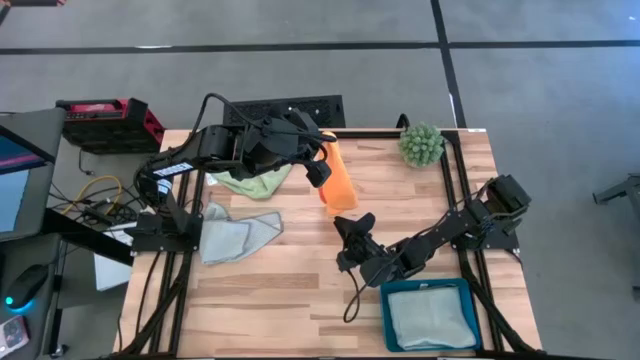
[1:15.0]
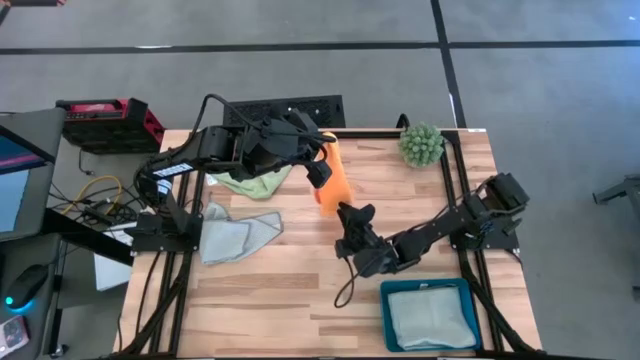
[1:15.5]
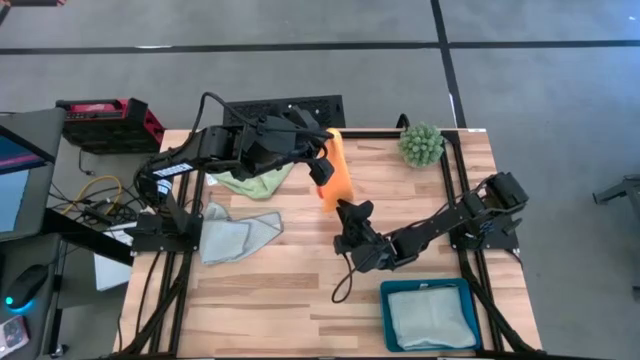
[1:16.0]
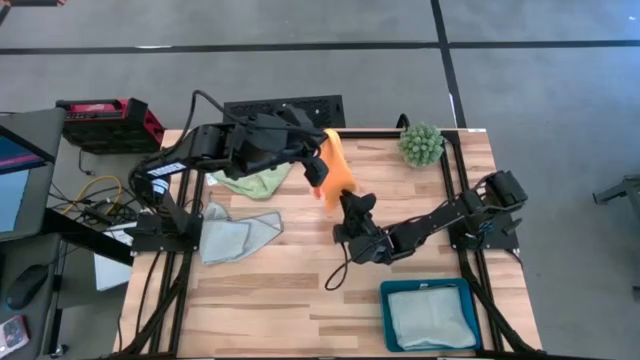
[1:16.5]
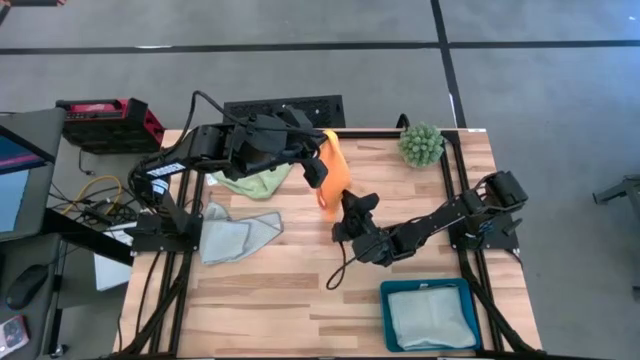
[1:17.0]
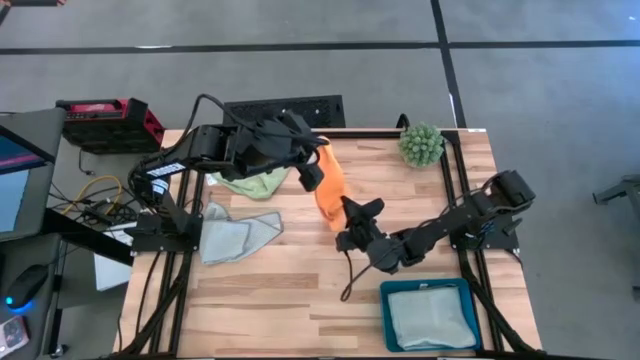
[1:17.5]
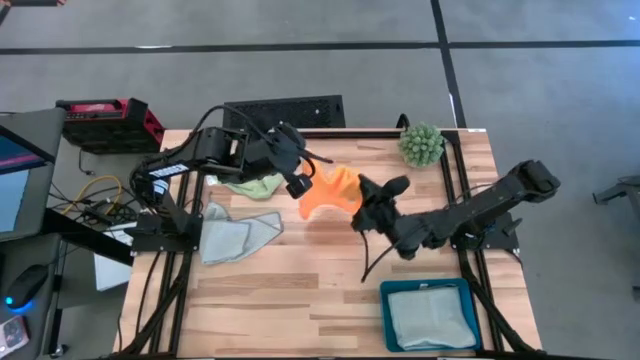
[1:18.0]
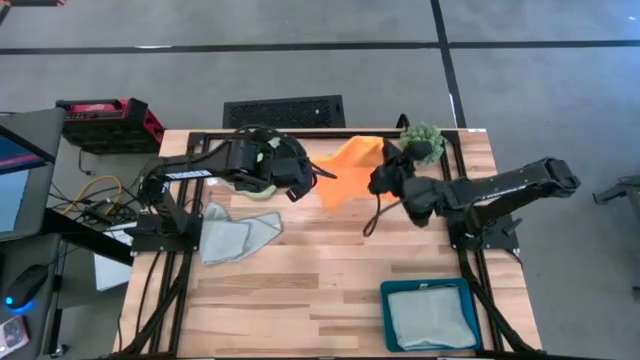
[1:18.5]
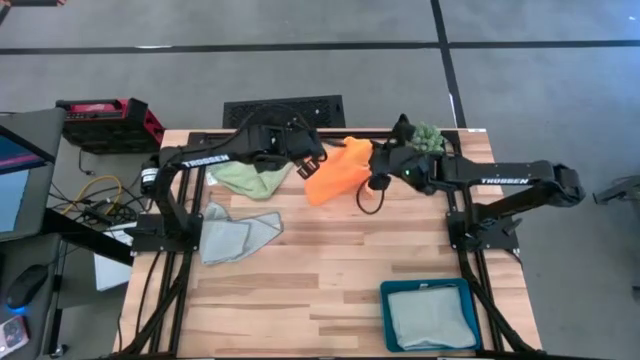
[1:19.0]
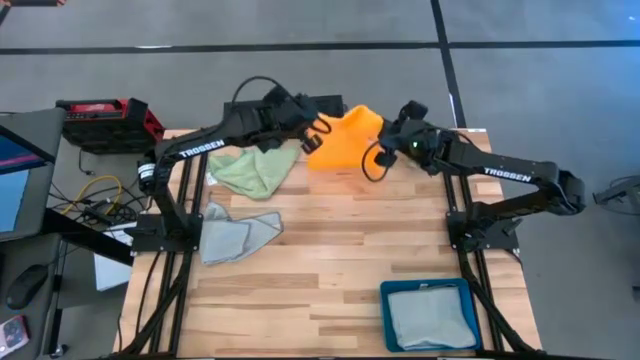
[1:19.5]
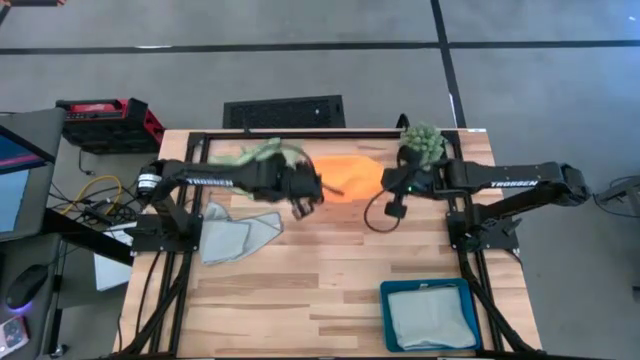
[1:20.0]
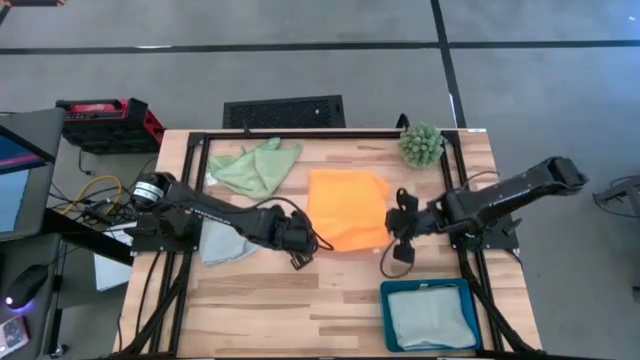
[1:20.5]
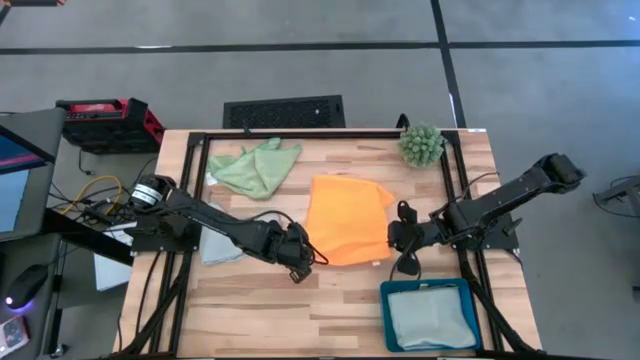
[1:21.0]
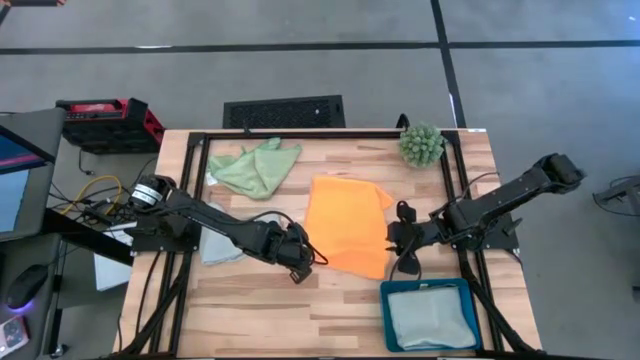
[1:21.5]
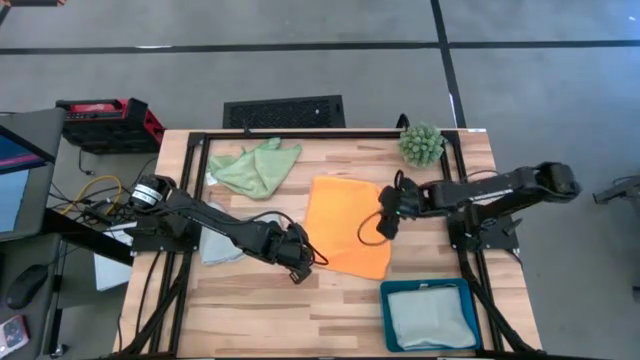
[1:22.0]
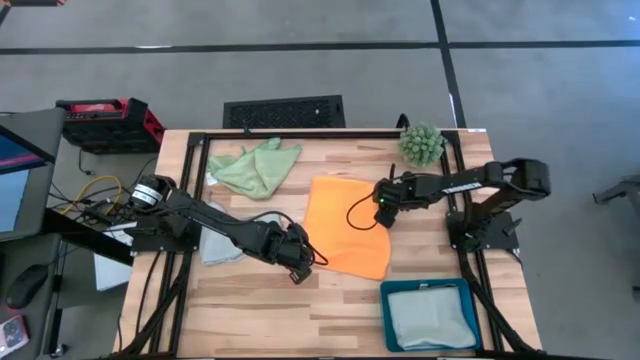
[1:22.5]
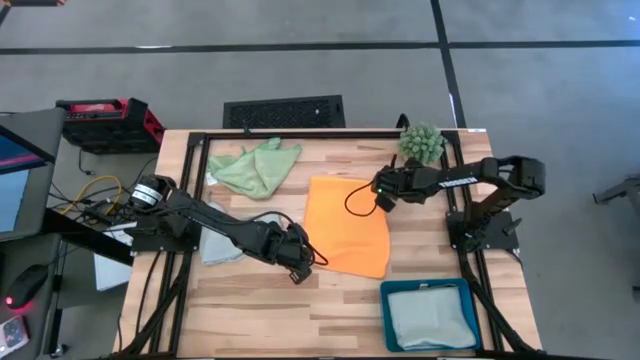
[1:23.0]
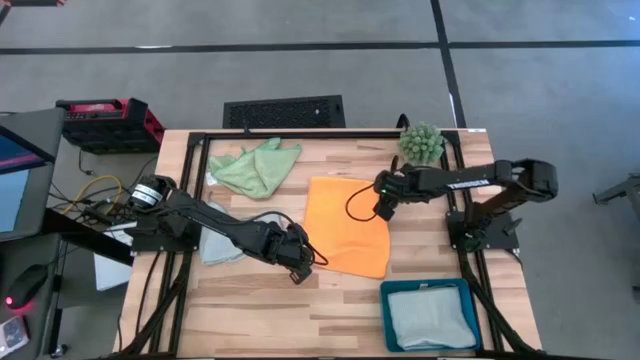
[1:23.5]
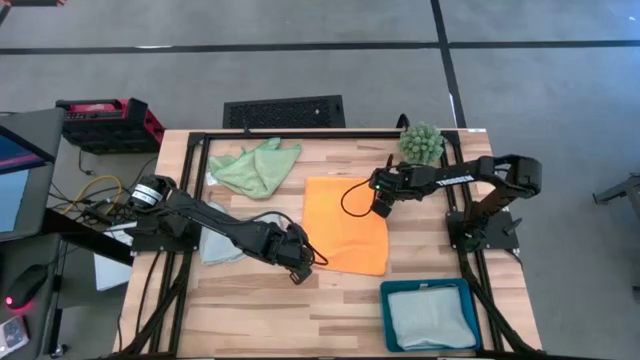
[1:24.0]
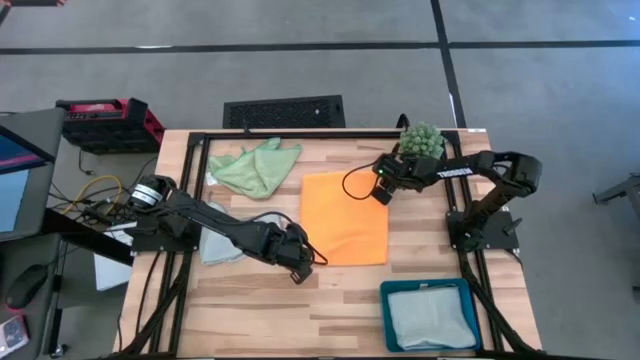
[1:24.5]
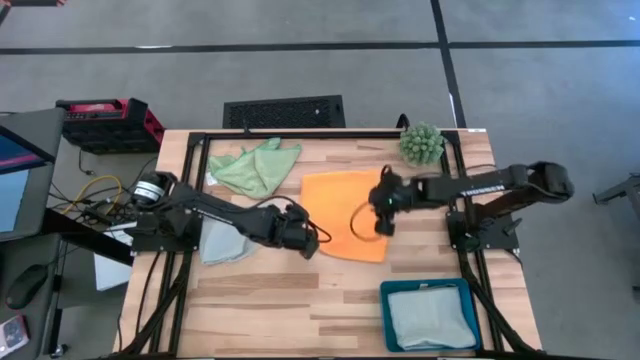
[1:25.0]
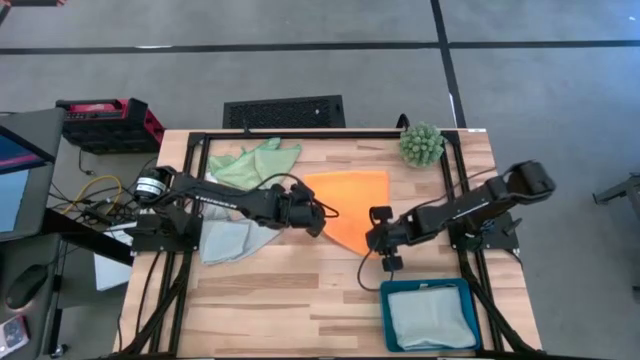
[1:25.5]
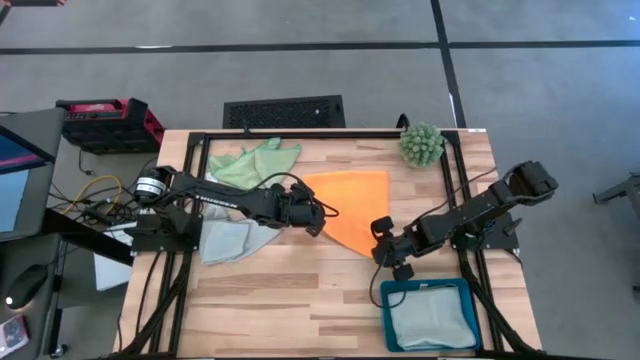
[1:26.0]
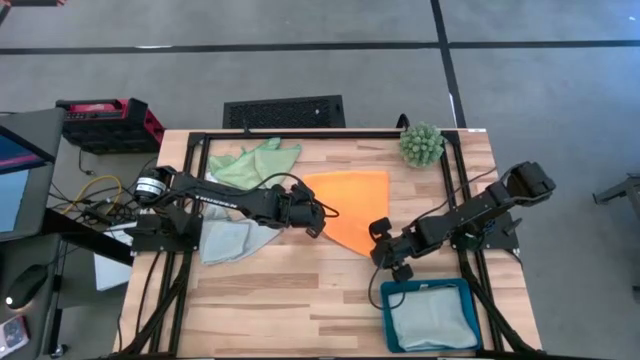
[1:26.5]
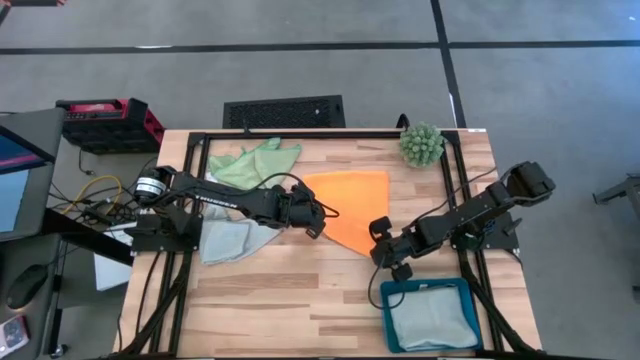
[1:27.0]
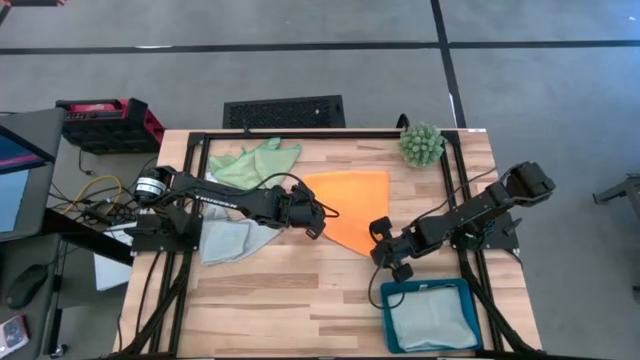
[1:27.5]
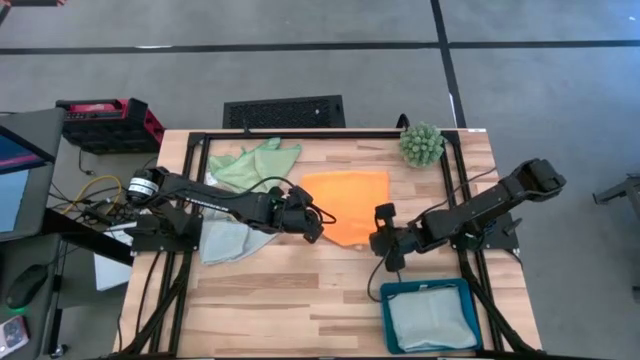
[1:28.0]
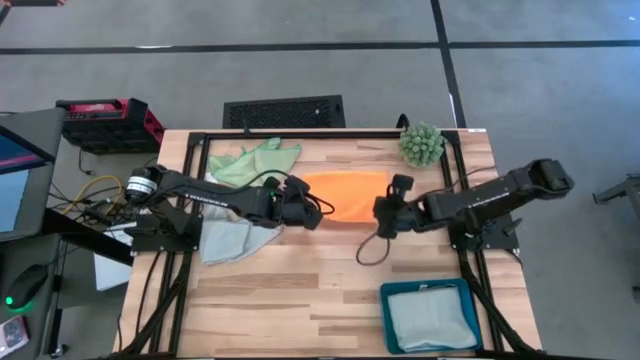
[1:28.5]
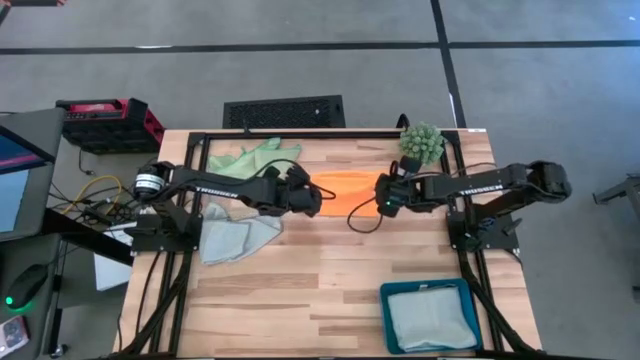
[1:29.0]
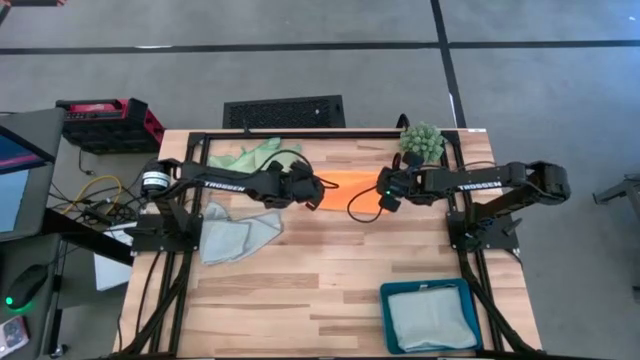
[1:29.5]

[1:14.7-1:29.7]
Task: Fold microfiber towels
Fold the orange towel

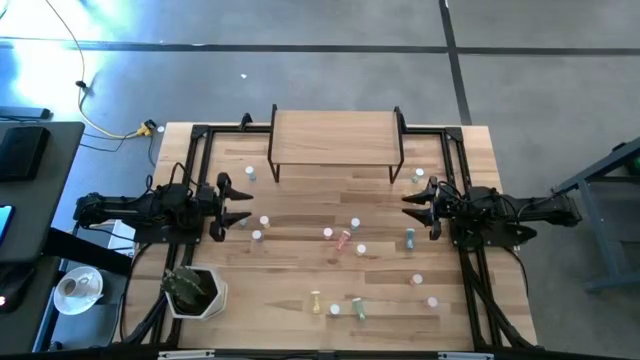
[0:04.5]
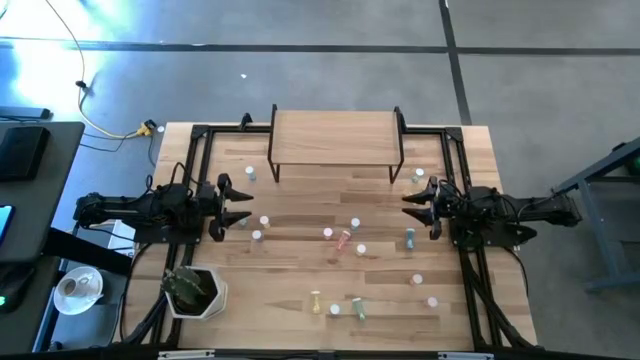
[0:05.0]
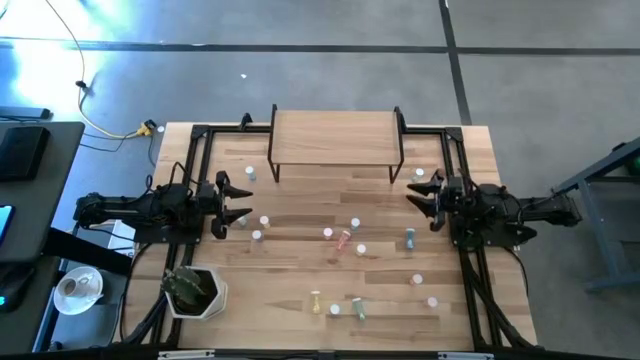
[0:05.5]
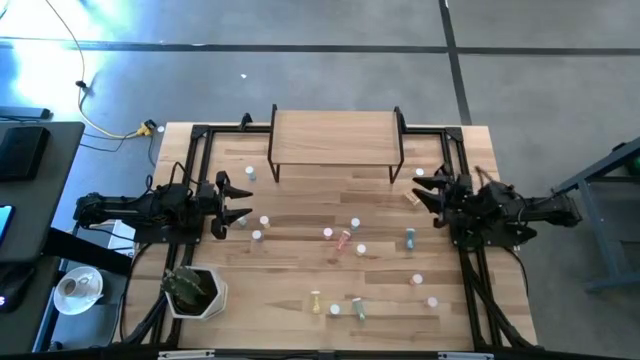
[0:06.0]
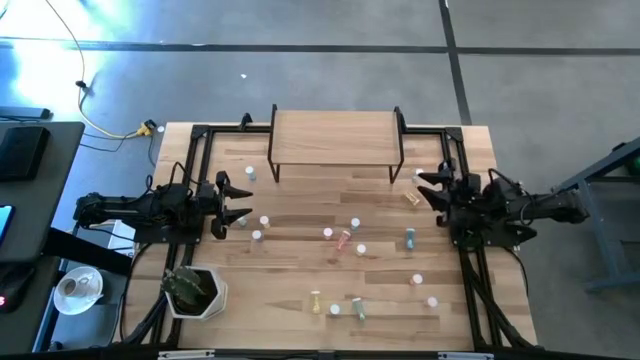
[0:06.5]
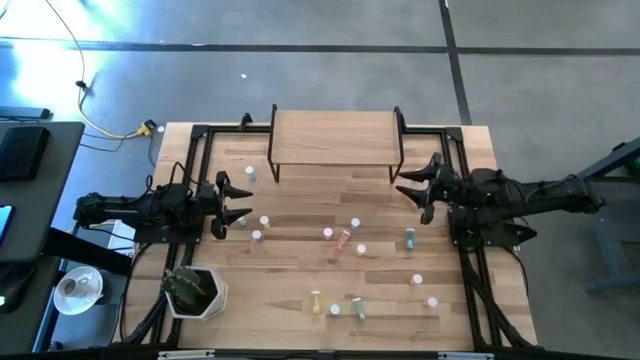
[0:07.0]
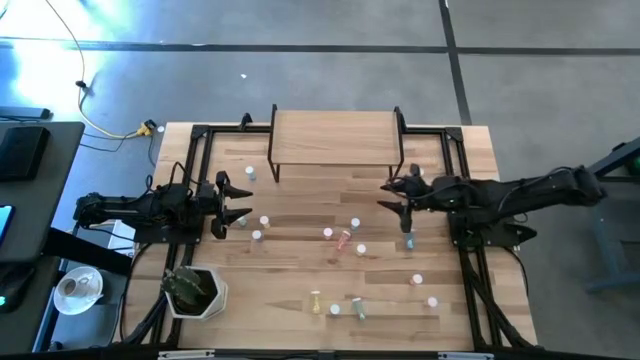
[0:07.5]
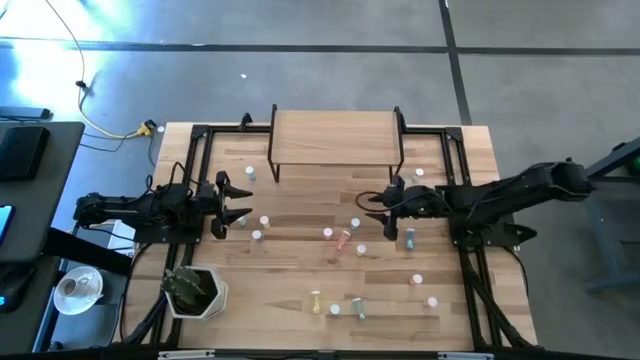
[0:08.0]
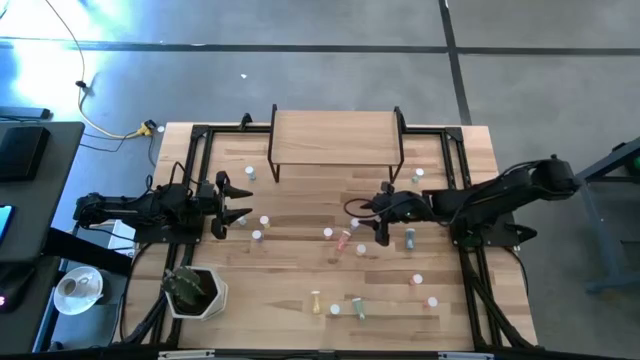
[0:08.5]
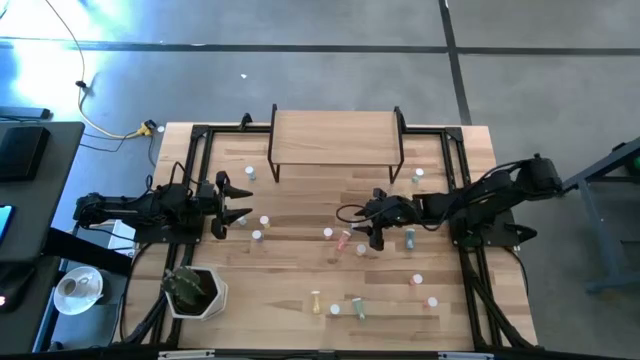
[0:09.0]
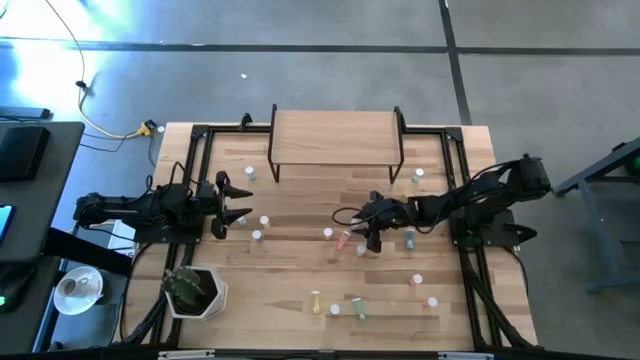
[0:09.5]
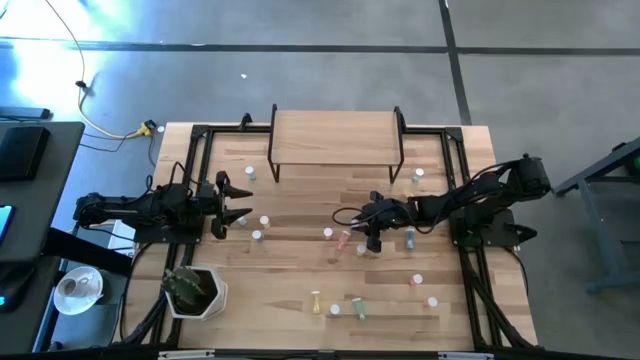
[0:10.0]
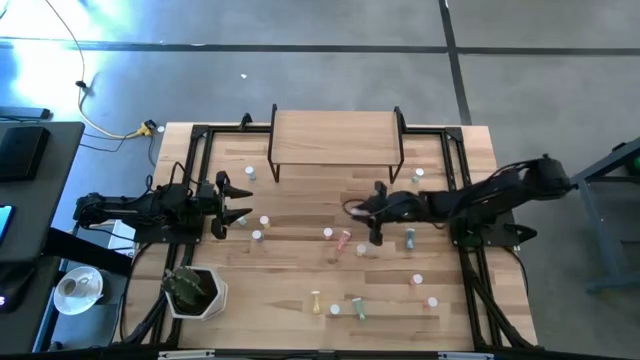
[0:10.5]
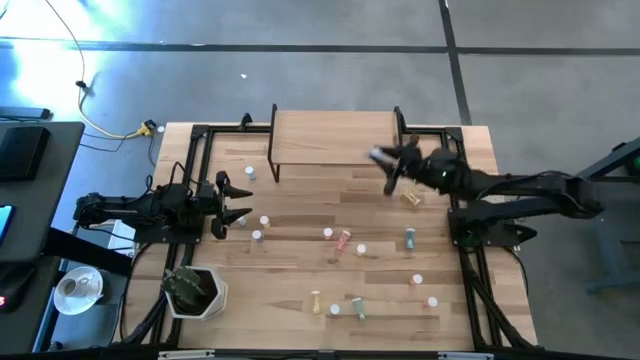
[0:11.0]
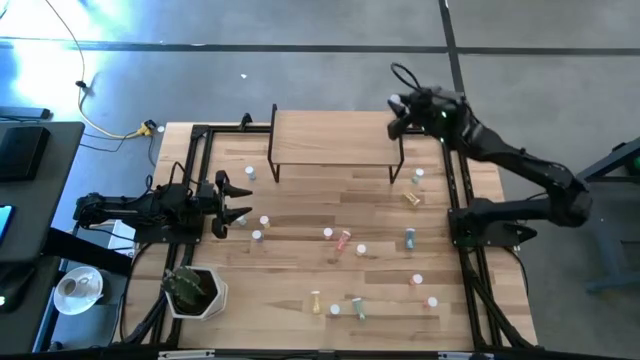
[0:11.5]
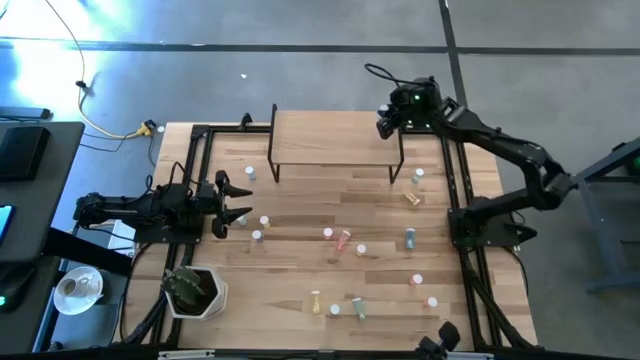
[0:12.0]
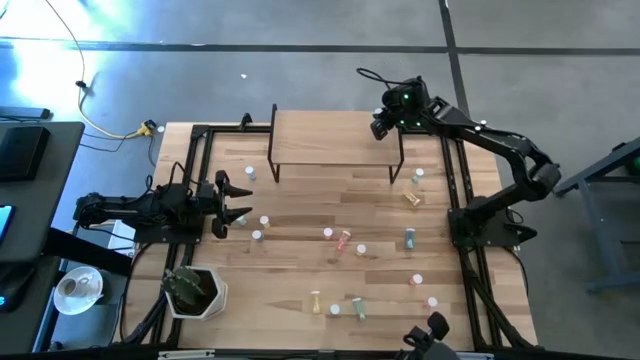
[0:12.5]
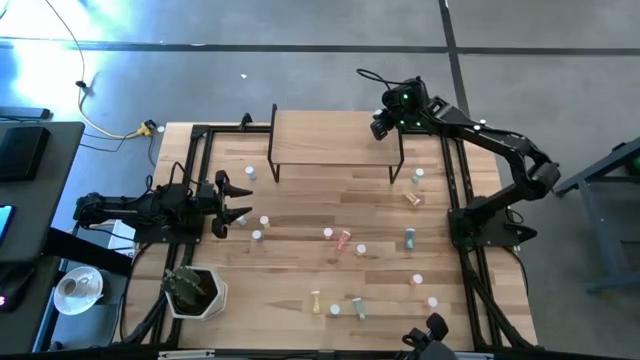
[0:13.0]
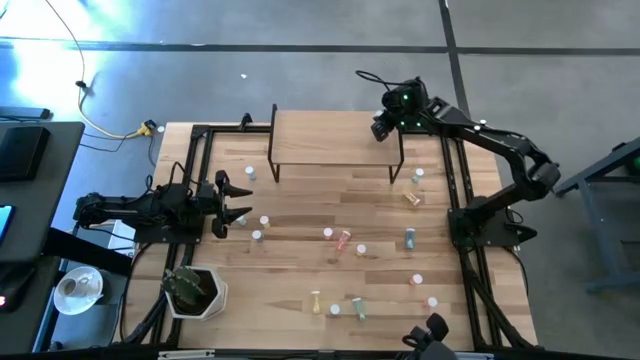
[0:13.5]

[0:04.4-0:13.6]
Task: Pick and place medicine bottles onto shelf by color
Put the blue pill bottle on the shelf
